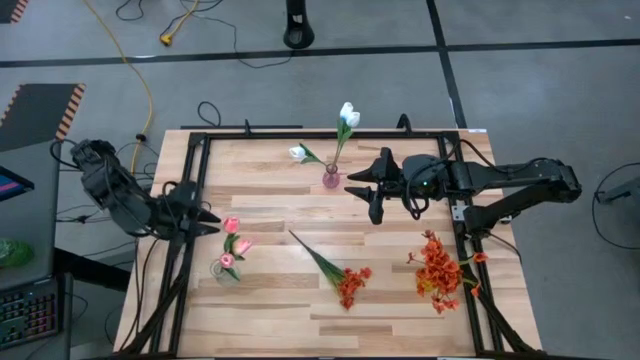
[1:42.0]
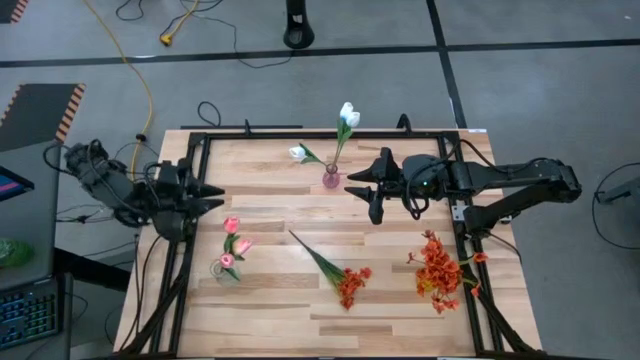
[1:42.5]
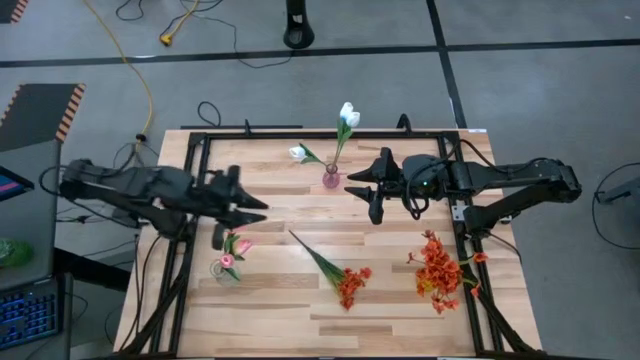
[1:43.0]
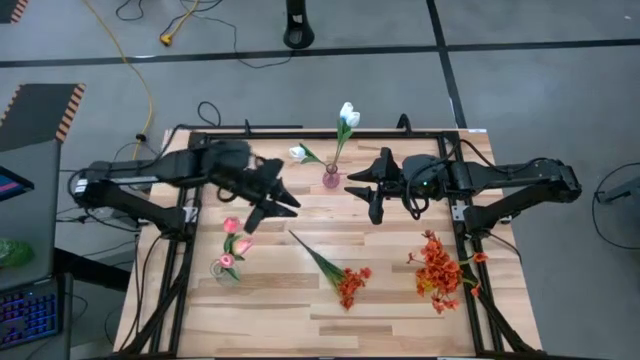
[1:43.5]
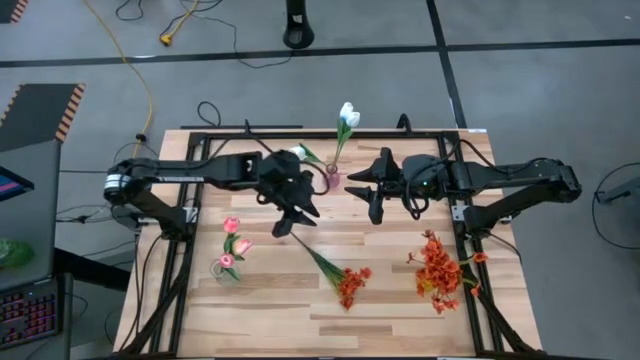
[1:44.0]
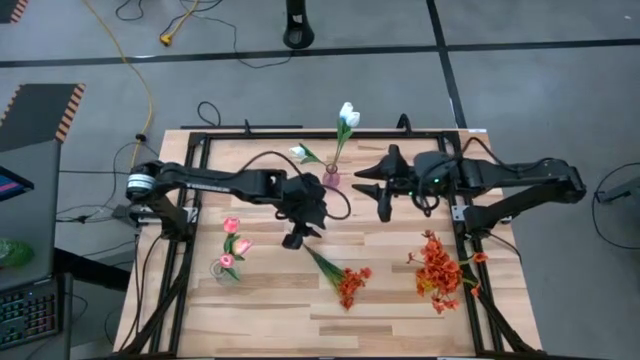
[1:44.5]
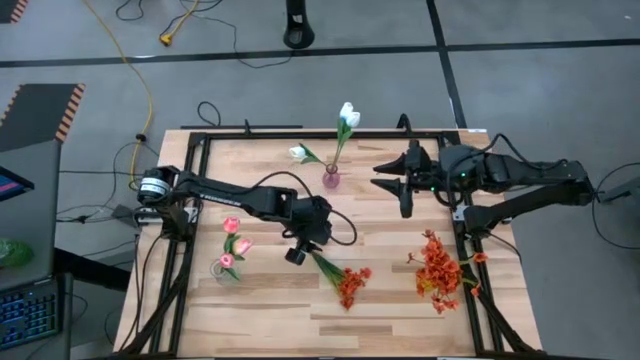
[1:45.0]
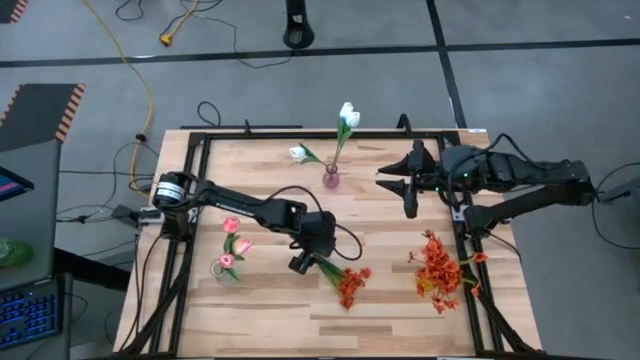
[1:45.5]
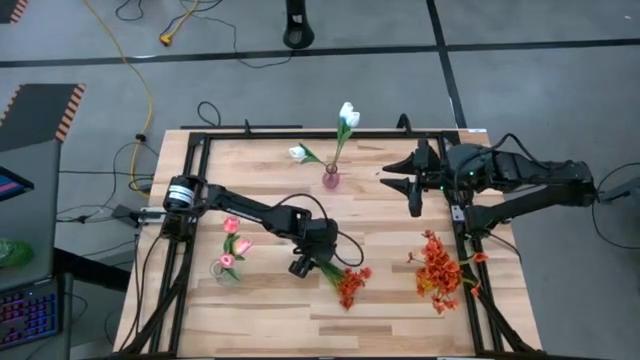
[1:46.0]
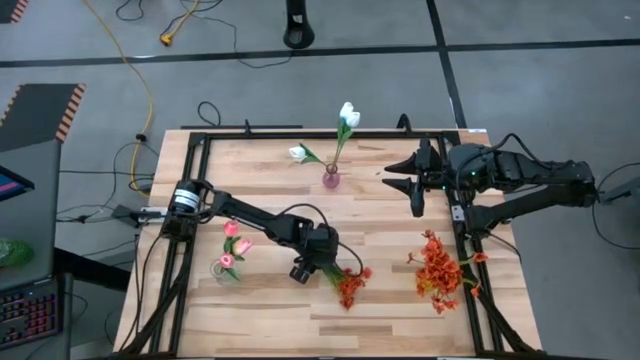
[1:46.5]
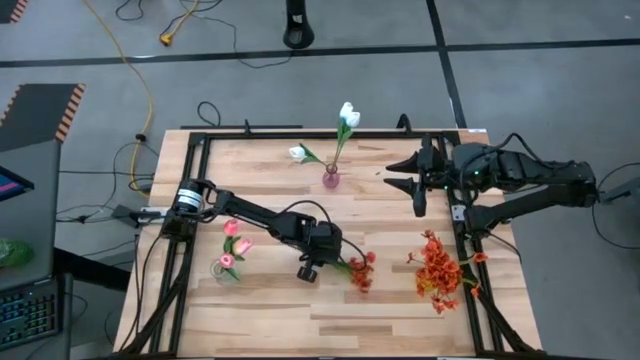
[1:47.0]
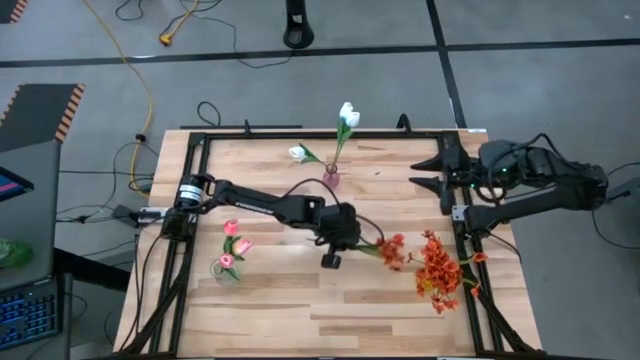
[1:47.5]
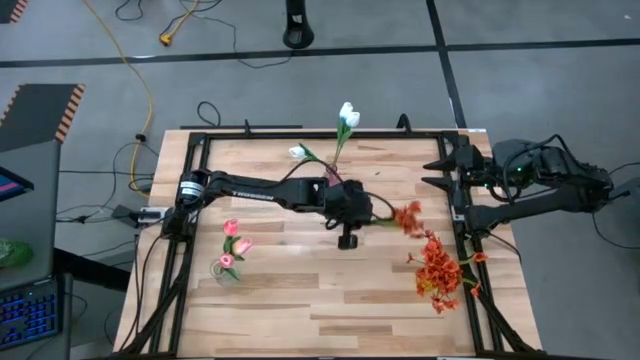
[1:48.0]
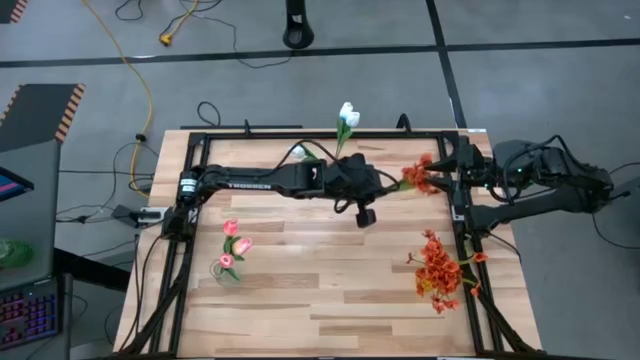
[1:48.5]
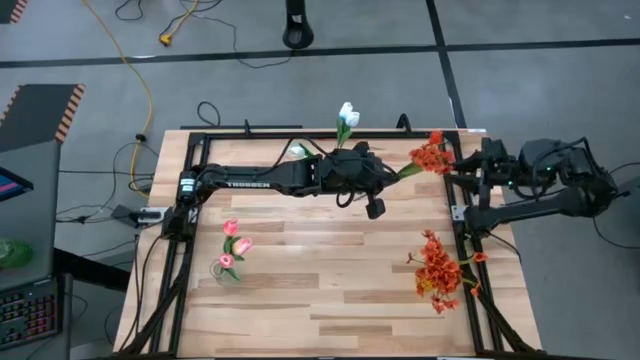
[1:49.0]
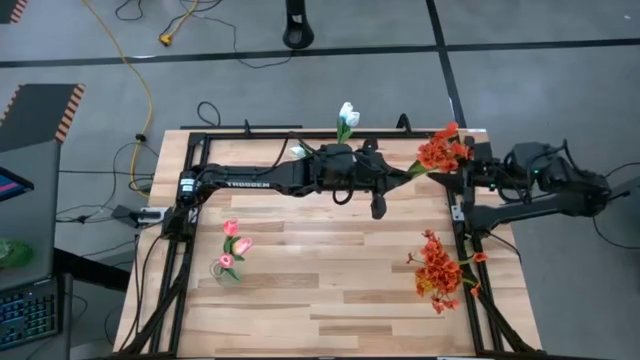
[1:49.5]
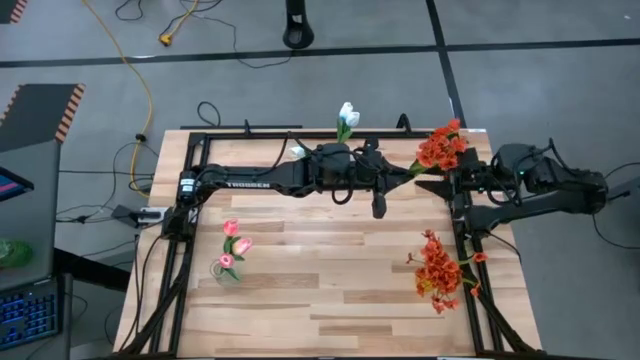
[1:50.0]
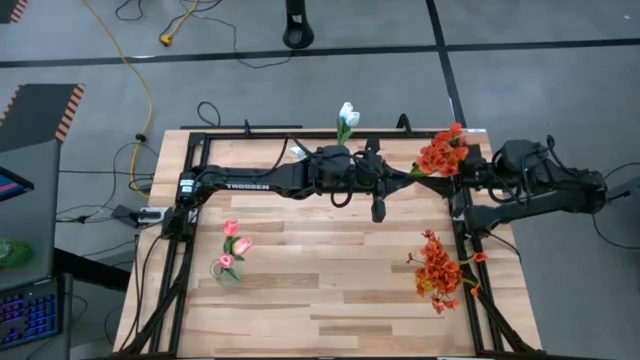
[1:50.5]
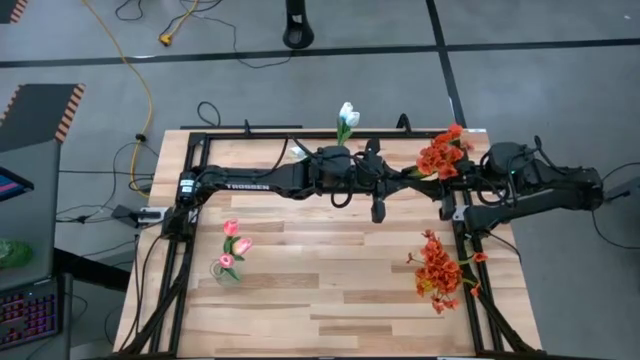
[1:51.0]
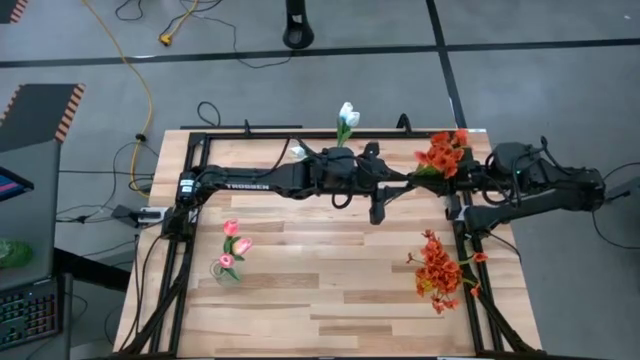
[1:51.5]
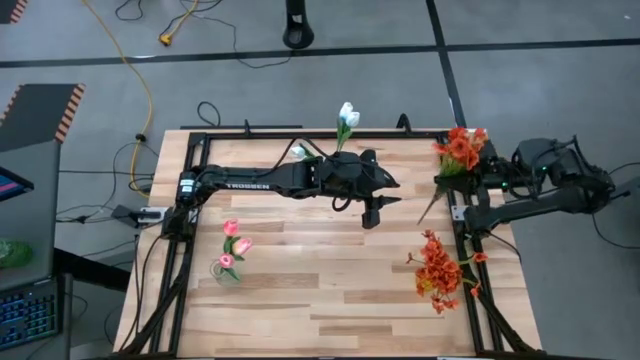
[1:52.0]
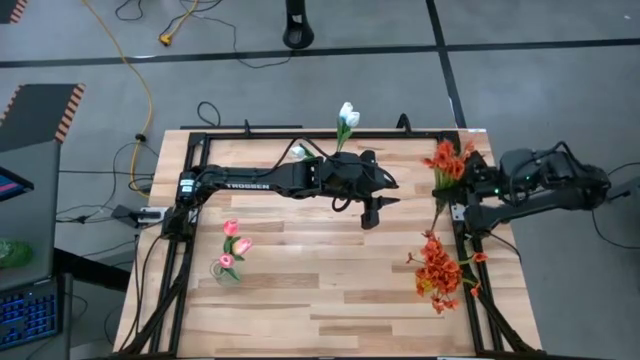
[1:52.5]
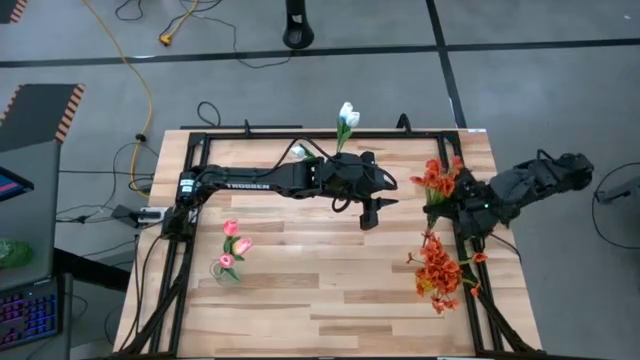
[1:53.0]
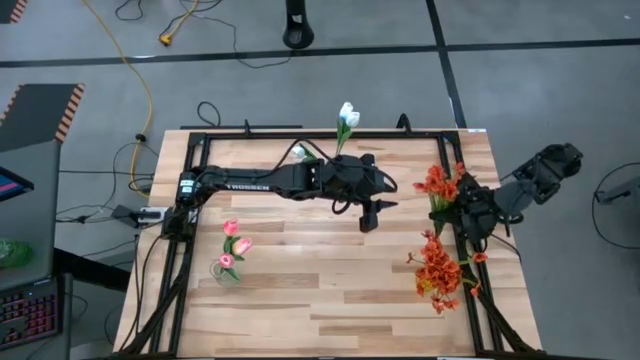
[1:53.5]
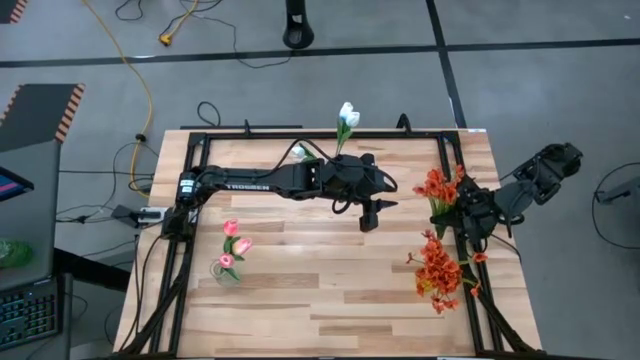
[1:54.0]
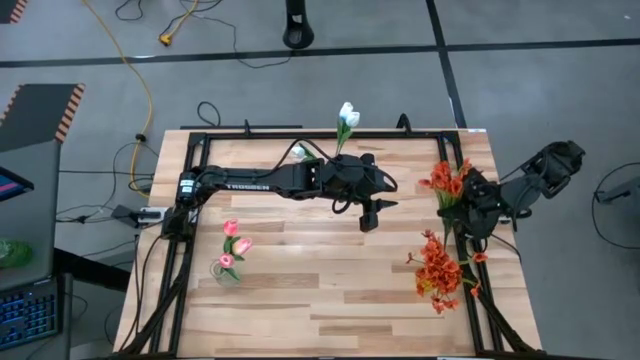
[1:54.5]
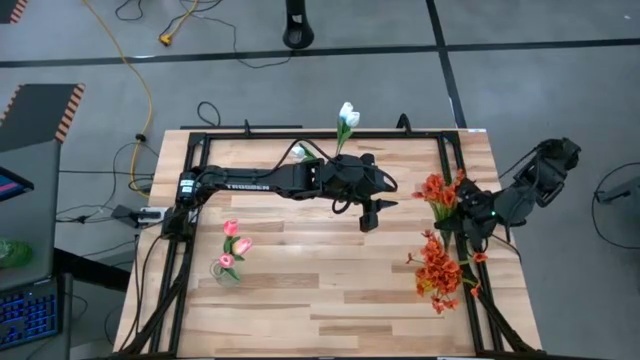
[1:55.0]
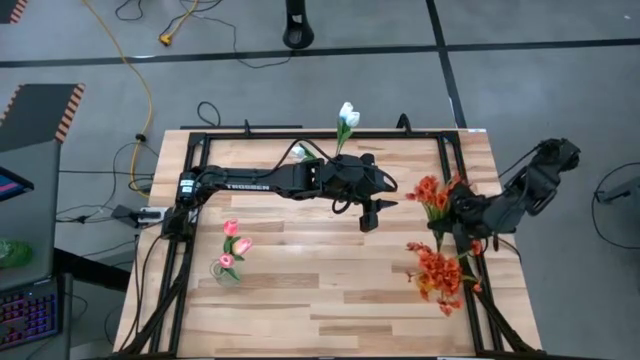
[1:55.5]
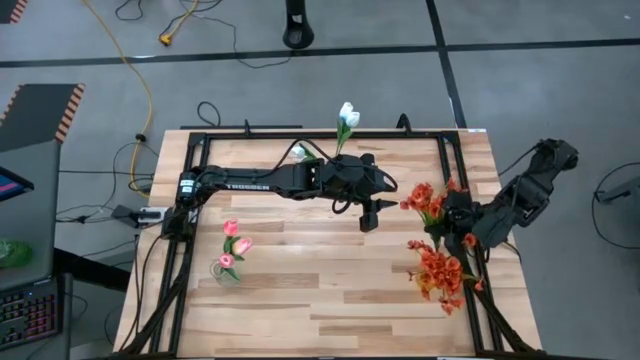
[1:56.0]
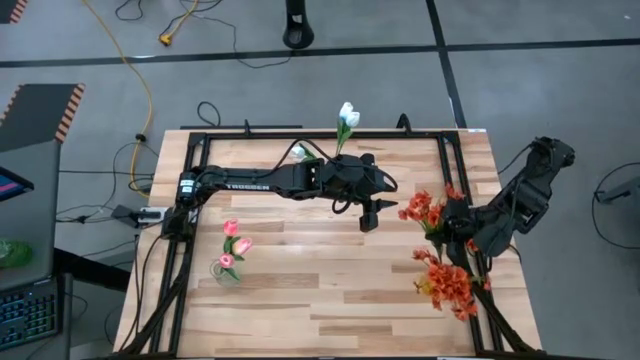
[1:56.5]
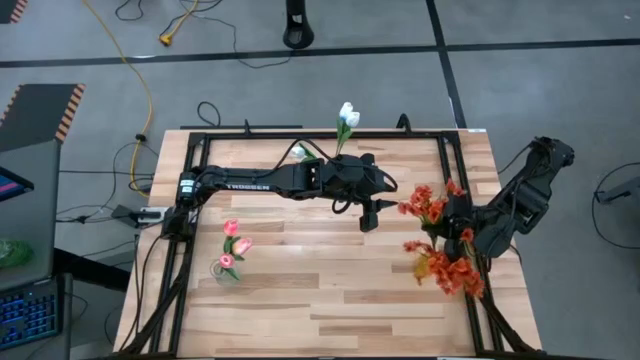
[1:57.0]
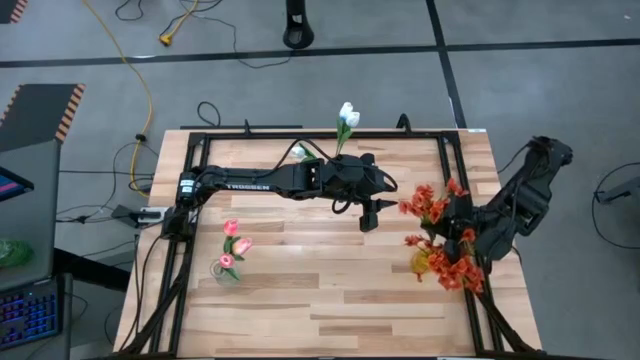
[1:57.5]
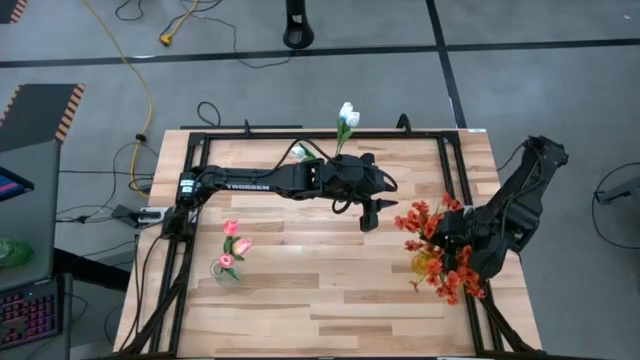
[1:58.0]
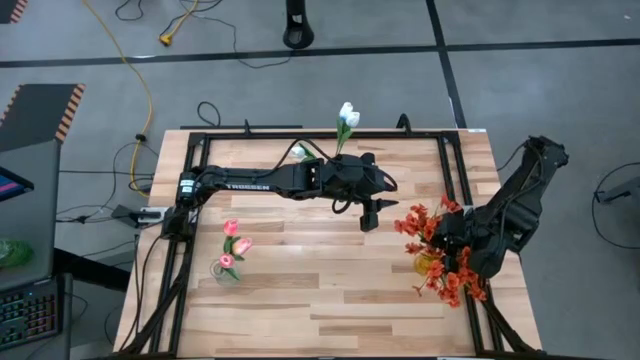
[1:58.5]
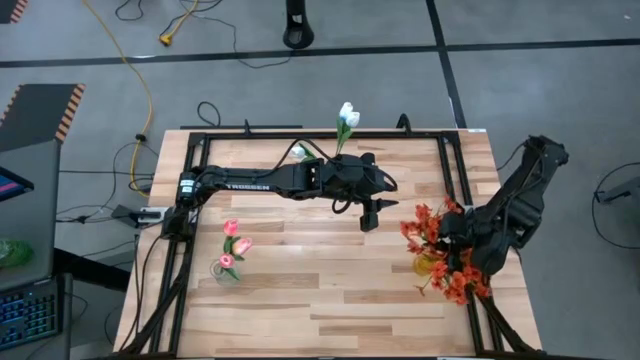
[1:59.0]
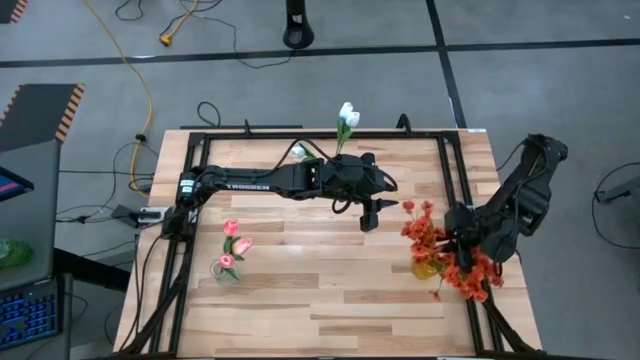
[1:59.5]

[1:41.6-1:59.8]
Task: Sort flowers into vase by color
Put the orange flower bouquet into the yellow vase

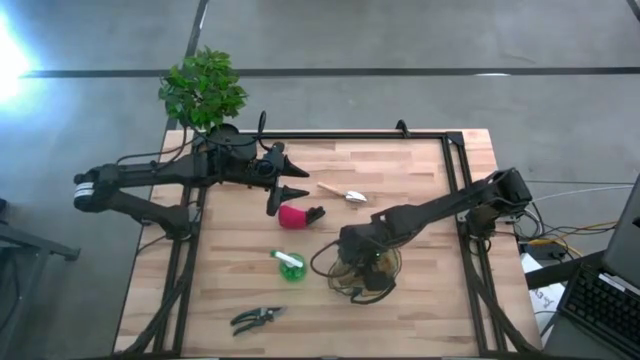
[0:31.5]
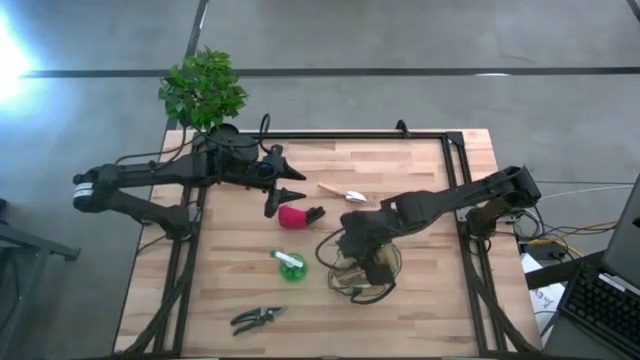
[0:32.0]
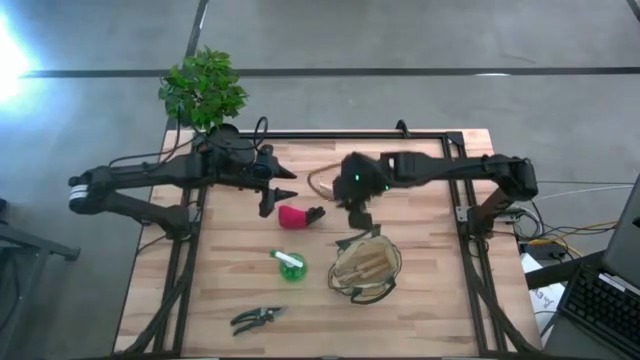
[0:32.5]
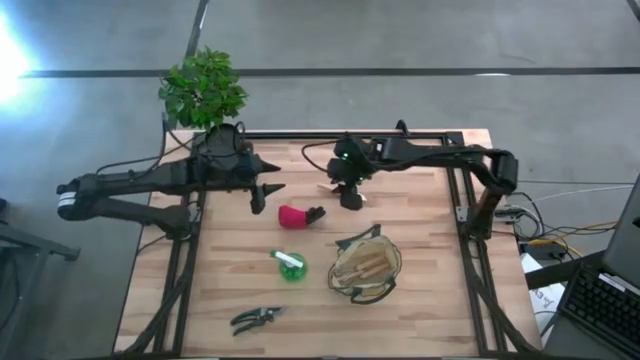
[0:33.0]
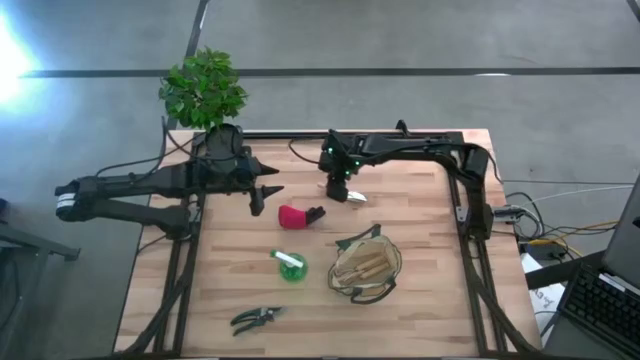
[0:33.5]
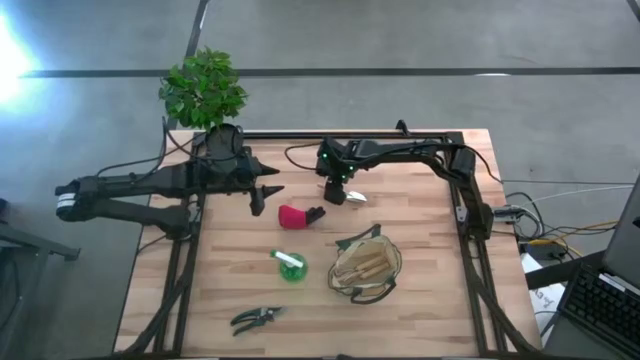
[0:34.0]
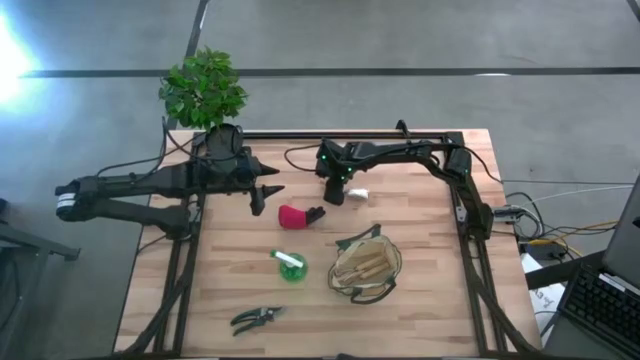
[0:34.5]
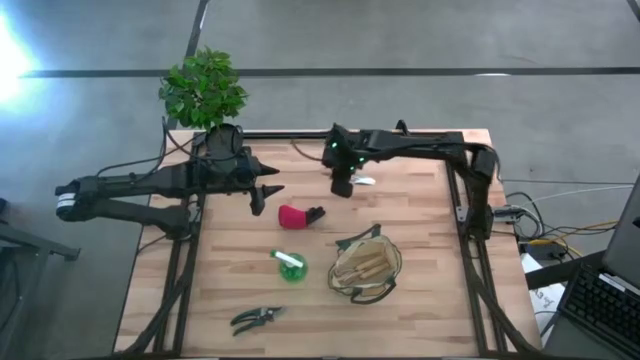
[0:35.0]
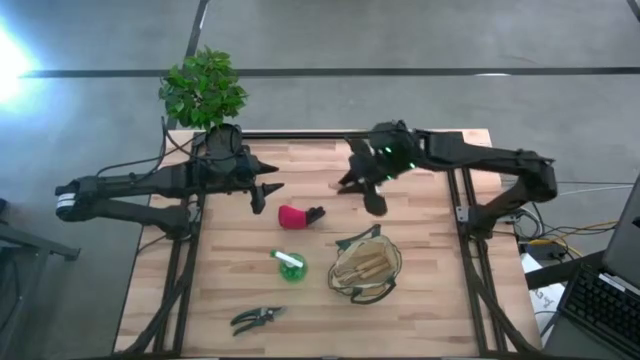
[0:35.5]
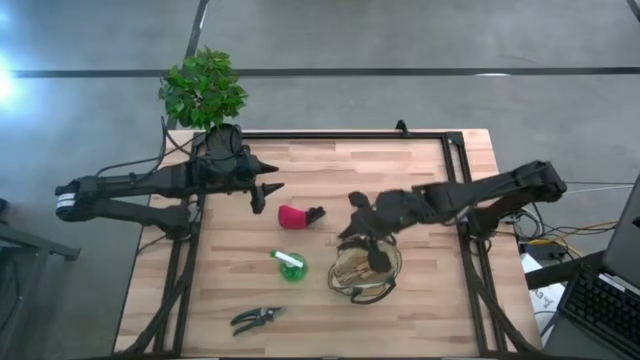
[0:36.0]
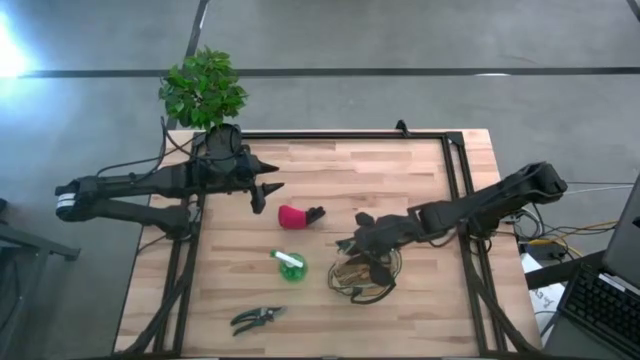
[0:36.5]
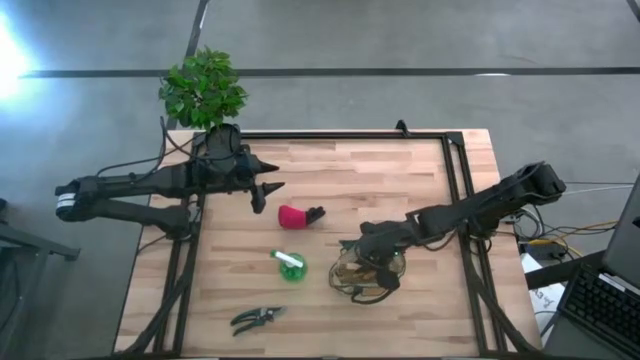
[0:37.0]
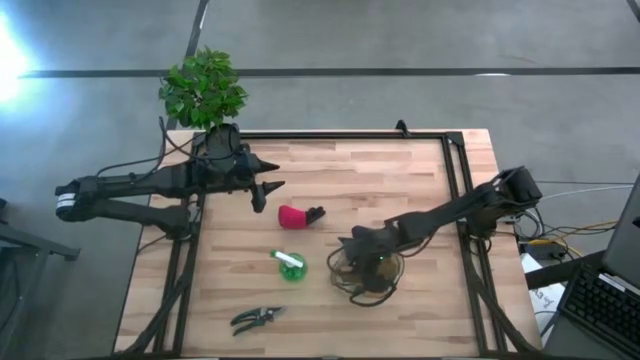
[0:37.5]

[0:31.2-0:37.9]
Task: Pick & Place Garden tools in Gardening bag
Put the brown trowel into the gardening bag
